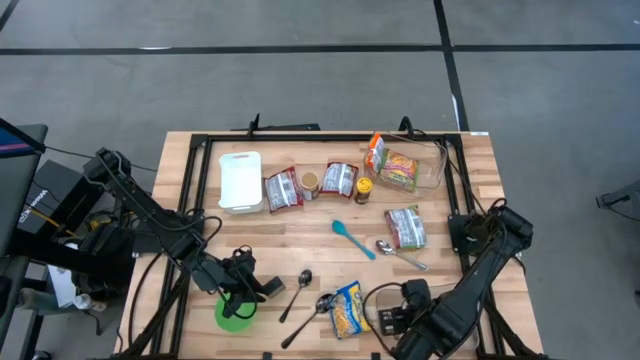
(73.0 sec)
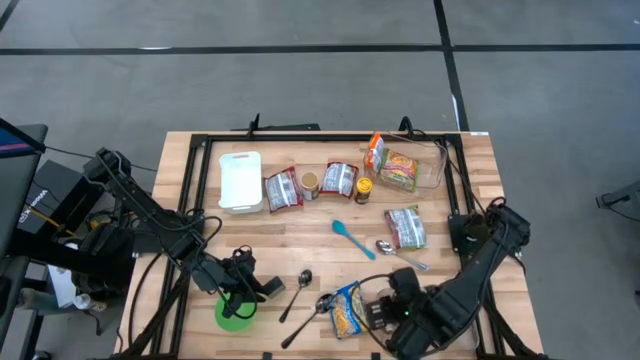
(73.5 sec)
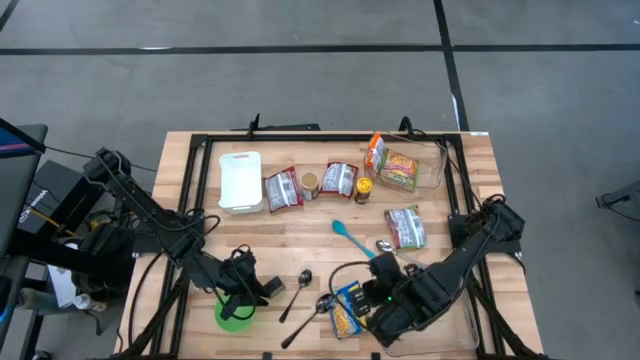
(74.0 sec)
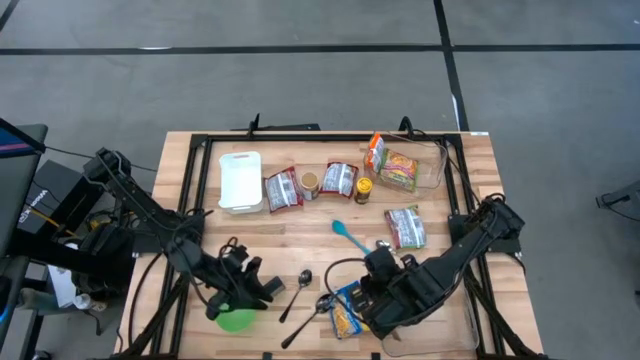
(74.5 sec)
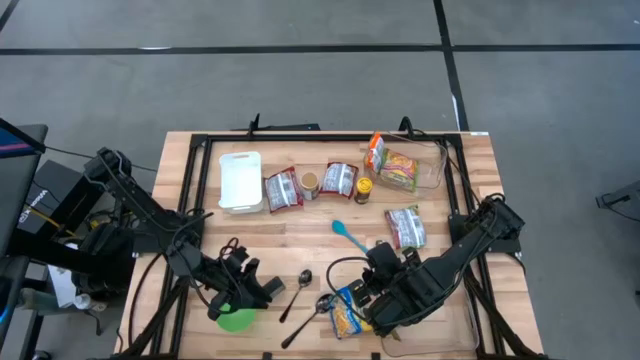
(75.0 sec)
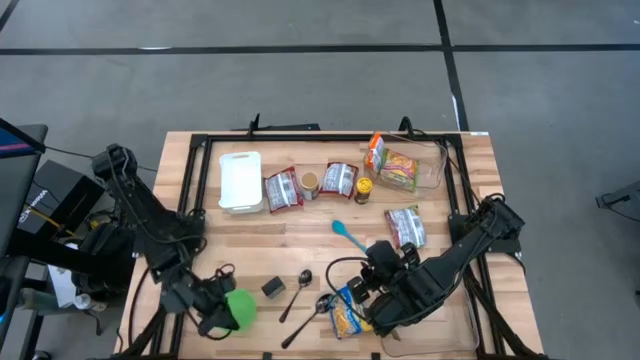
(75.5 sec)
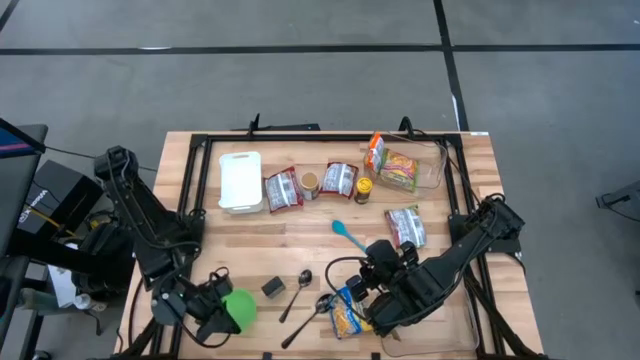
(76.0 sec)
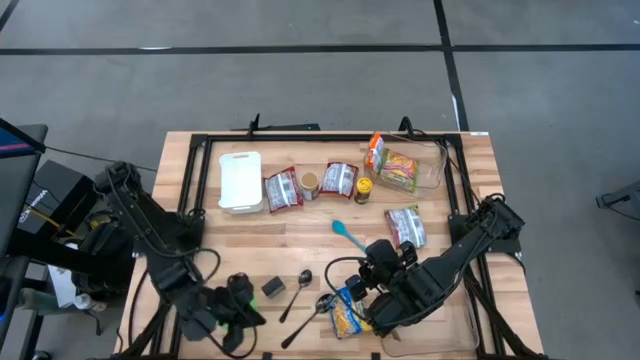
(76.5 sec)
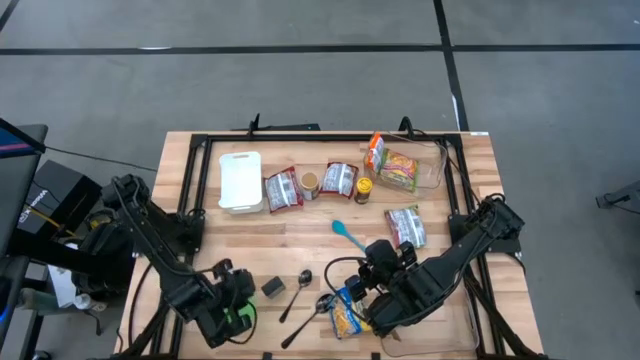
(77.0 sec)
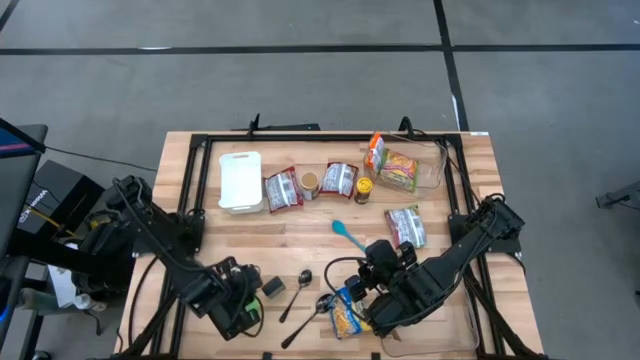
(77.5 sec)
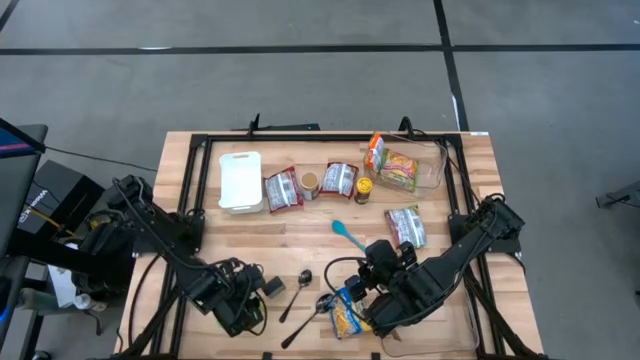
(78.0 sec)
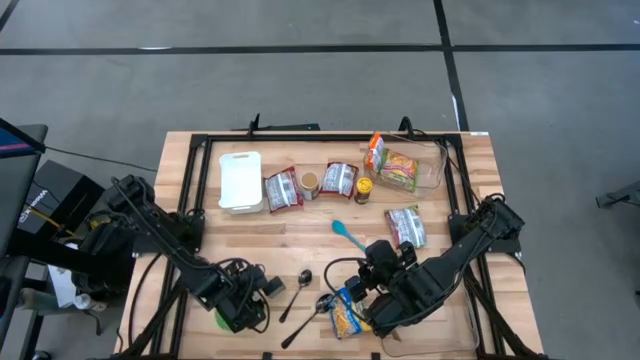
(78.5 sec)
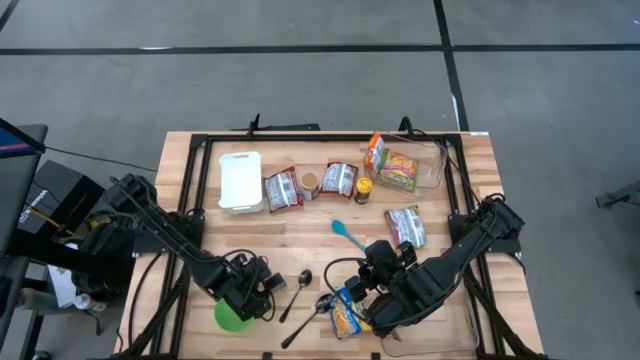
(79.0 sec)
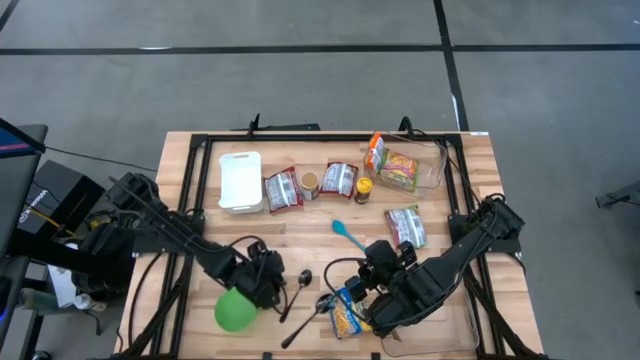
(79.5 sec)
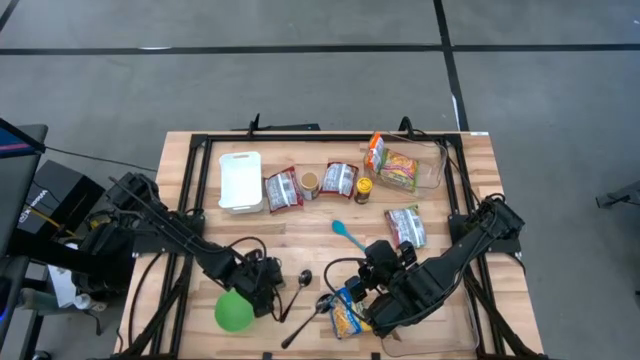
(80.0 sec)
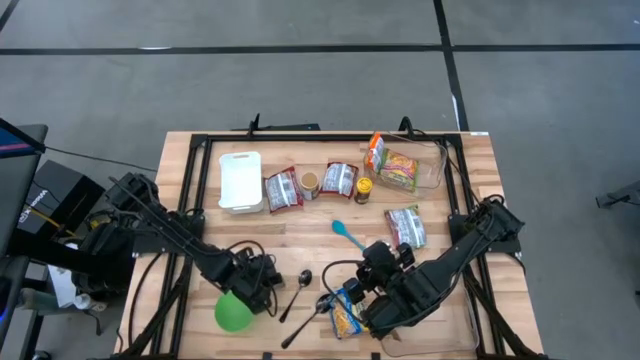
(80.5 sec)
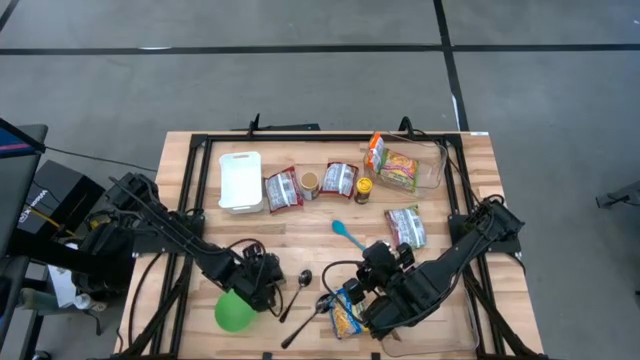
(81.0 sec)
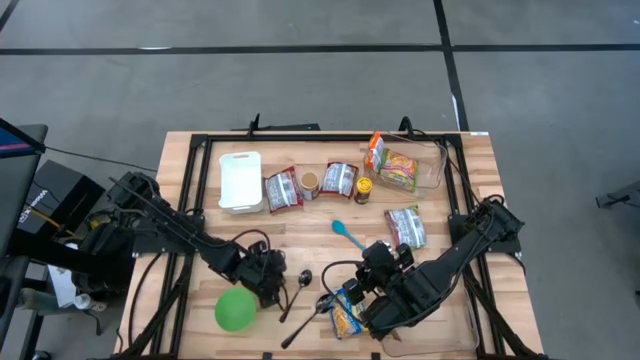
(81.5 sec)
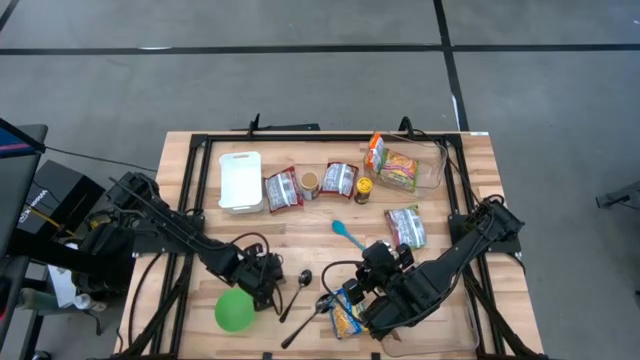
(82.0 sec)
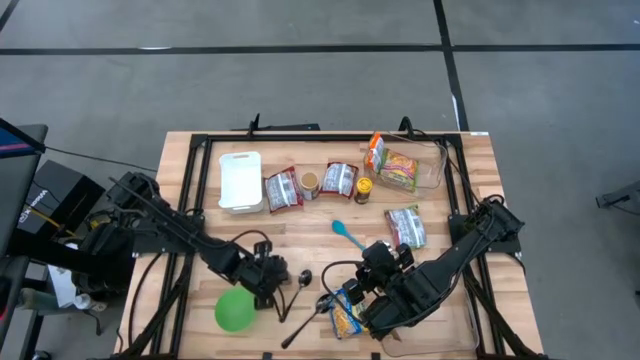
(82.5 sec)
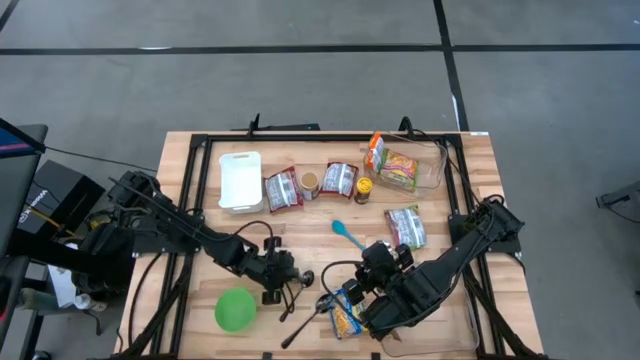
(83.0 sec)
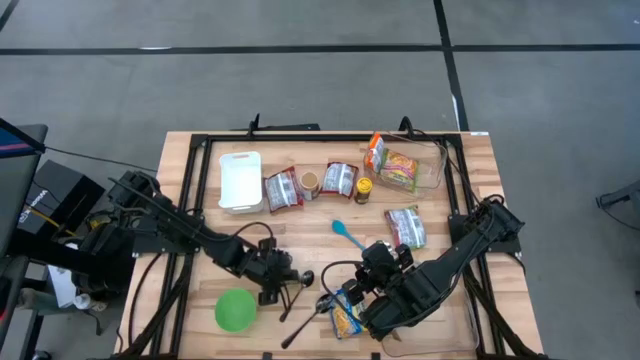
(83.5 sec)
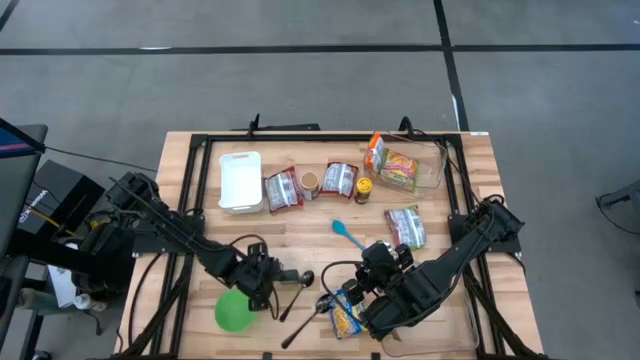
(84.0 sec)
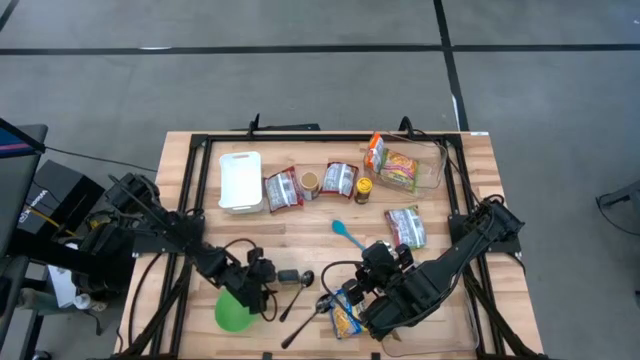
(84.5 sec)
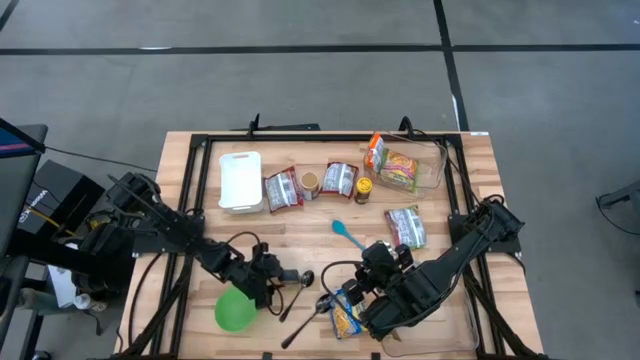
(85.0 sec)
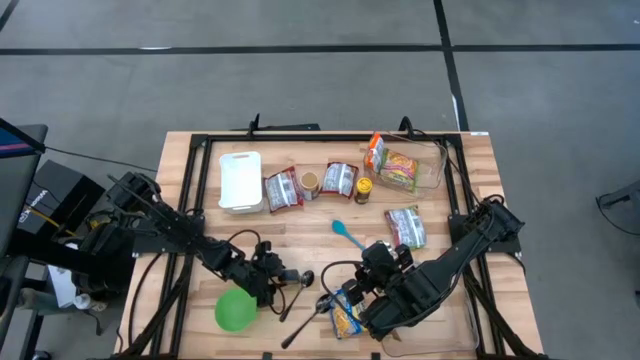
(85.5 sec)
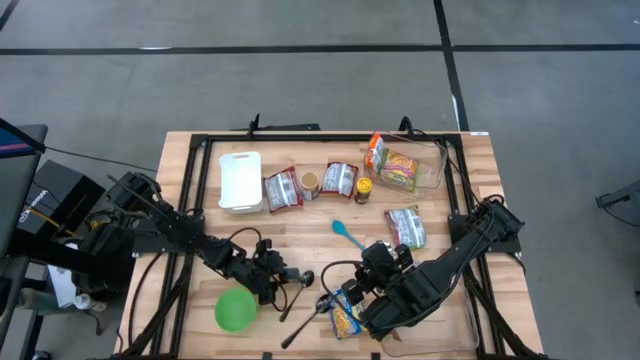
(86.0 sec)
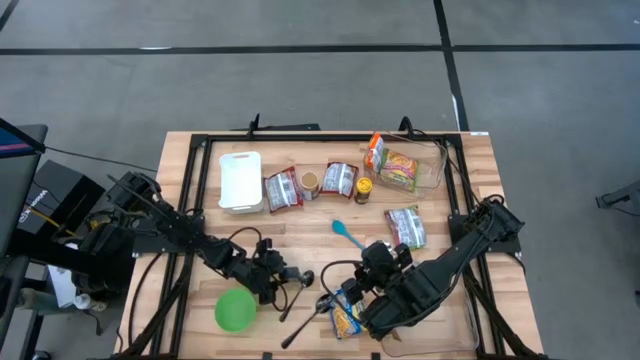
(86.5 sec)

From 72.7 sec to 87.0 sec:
Task: Pick & Place Food Item
Put the black spice can into the bottom transparent bin

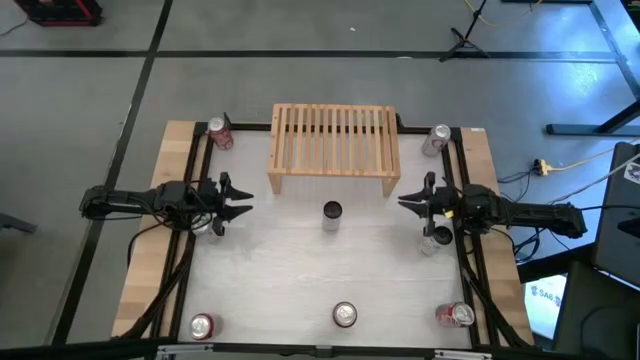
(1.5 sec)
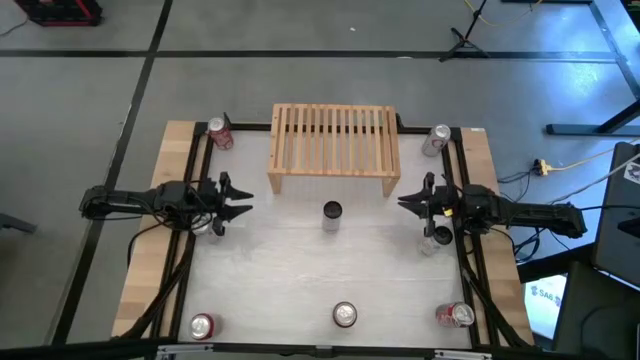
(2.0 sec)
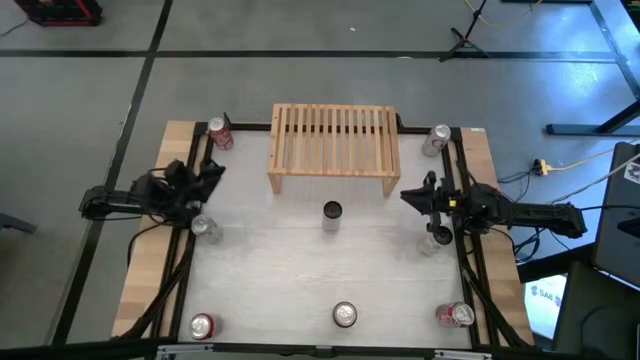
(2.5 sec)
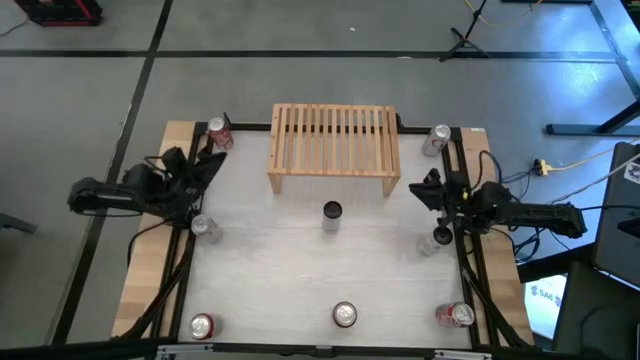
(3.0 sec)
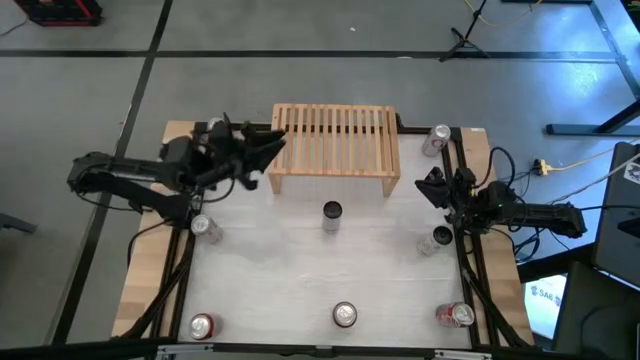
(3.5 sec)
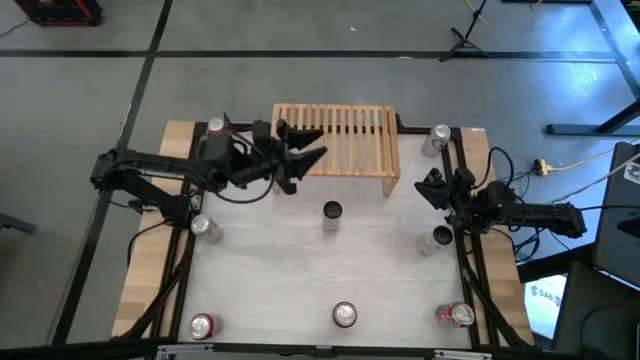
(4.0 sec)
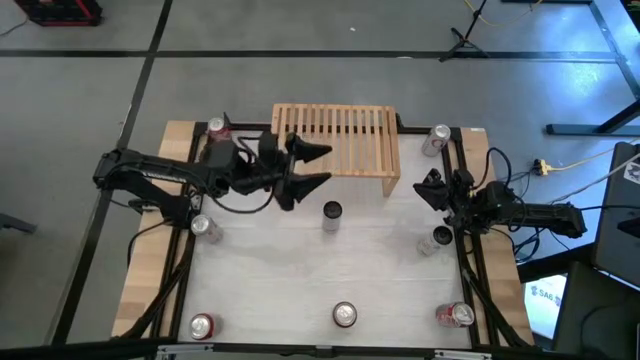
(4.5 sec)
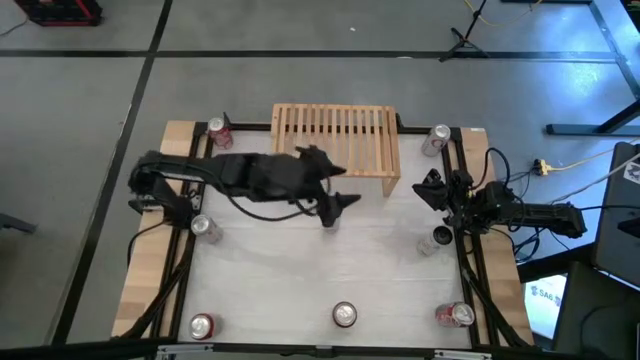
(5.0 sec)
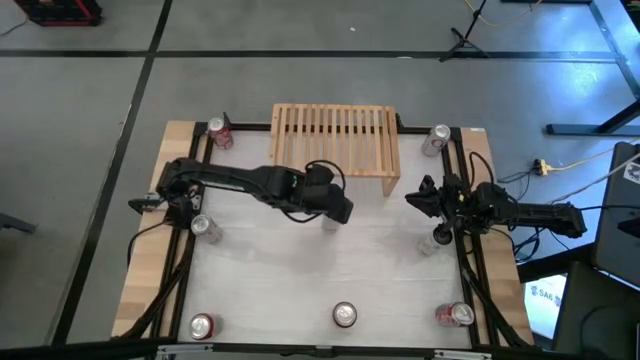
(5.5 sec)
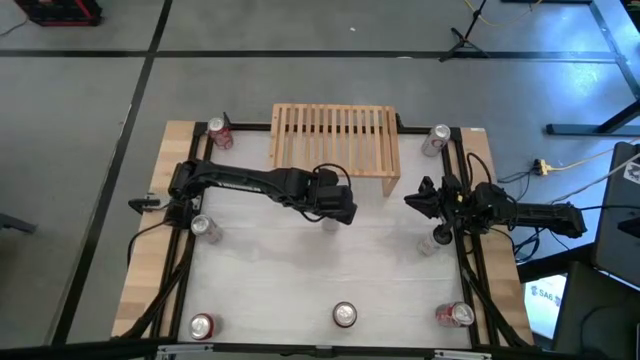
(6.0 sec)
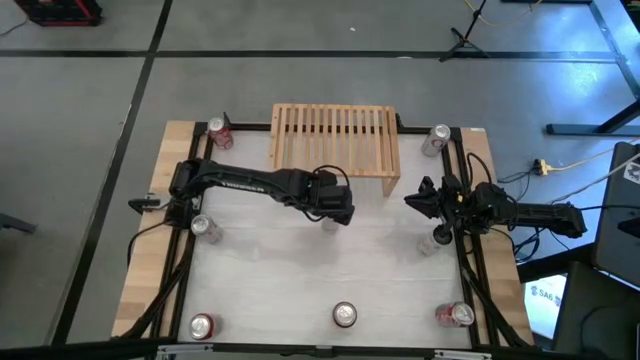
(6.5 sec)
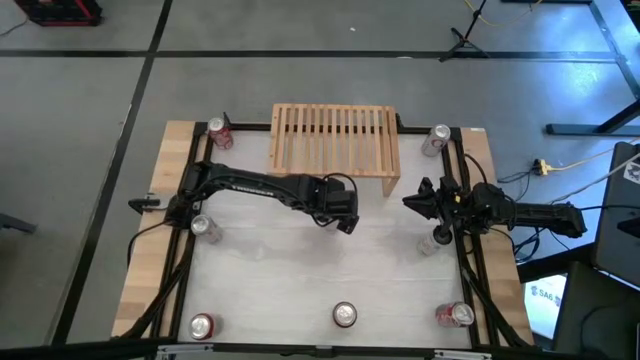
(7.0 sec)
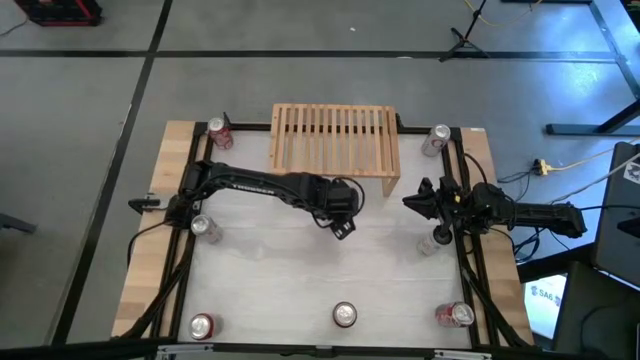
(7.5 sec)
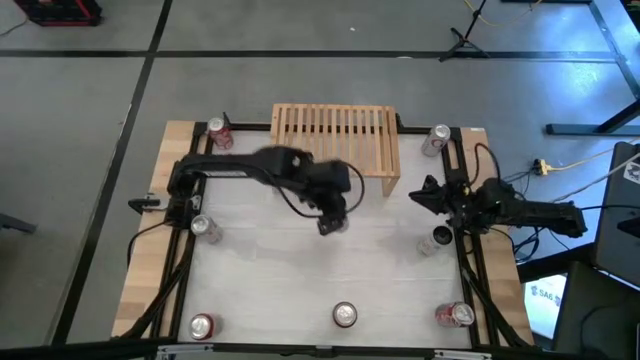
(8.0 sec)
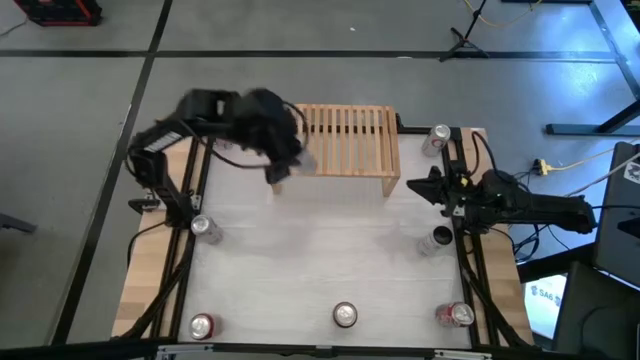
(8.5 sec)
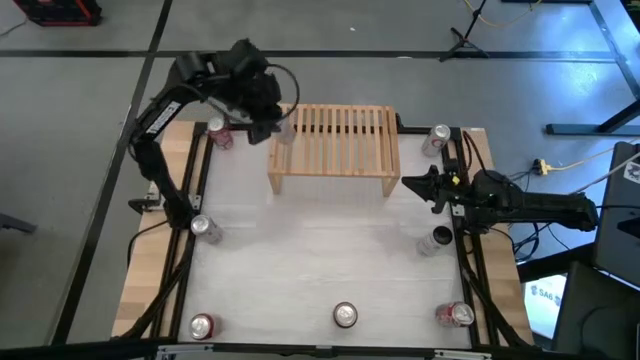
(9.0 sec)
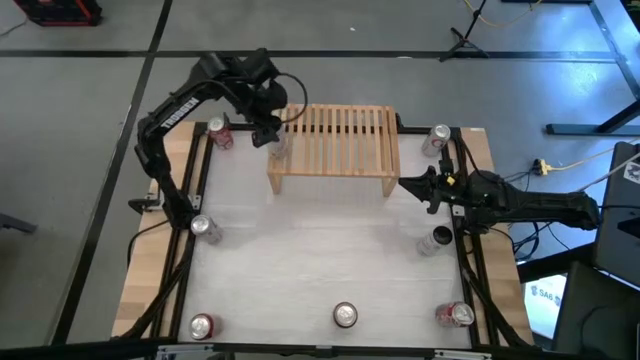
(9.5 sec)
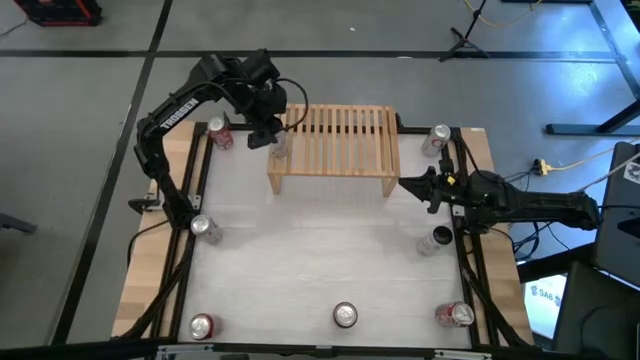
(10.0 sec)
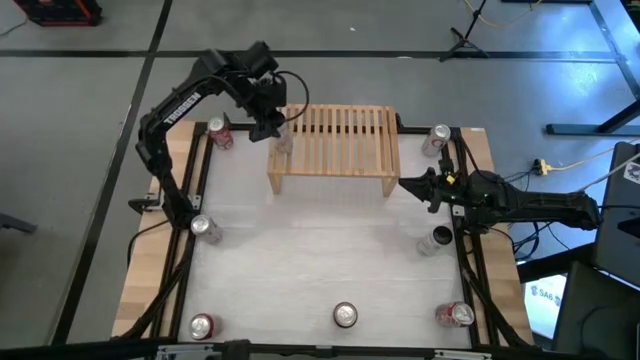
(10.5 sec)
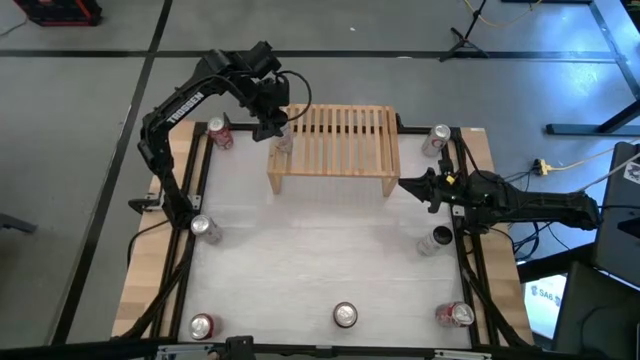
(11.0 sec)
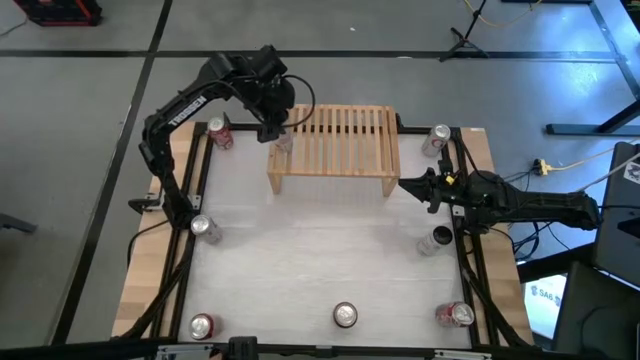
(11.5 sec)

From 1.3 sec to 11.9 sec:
Task: Place canned beverage on shelf
Put the white soda can on the shelf
